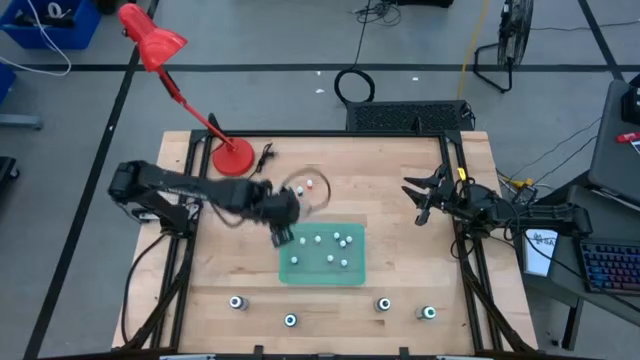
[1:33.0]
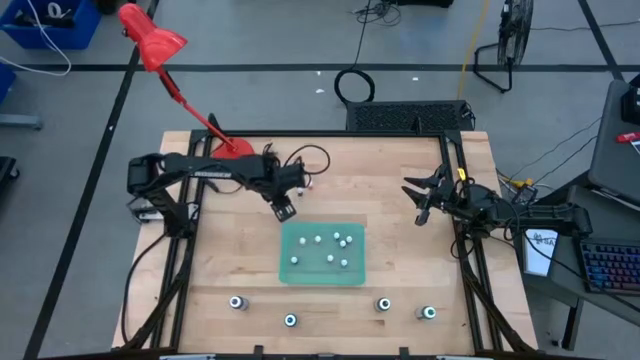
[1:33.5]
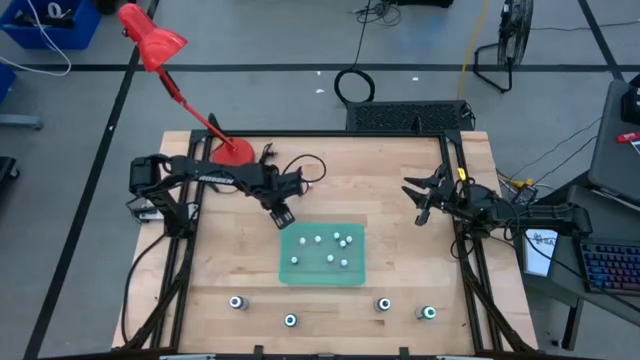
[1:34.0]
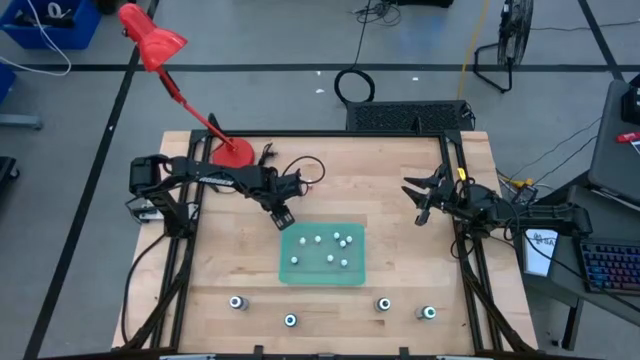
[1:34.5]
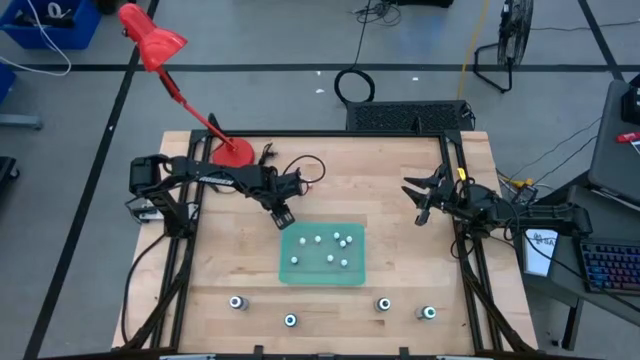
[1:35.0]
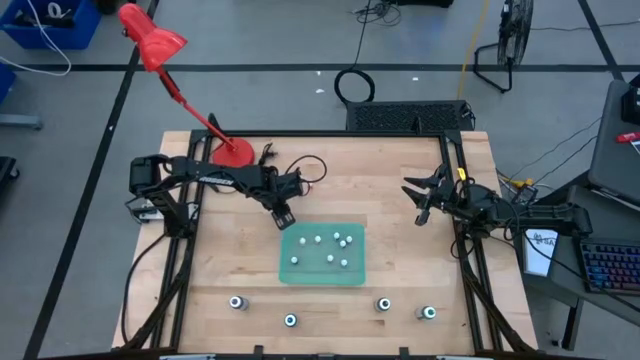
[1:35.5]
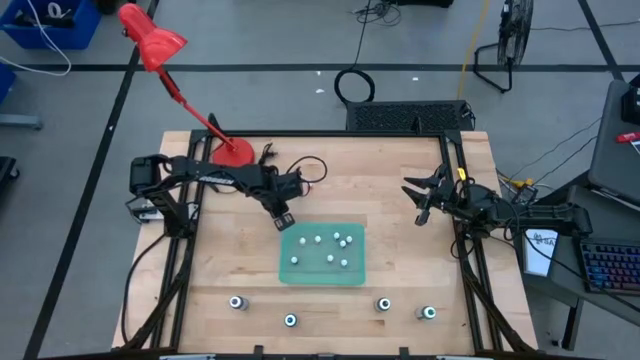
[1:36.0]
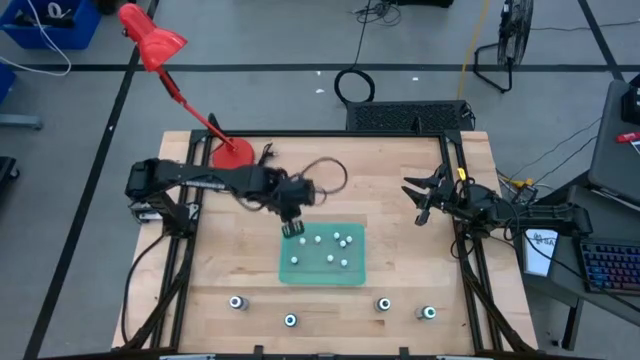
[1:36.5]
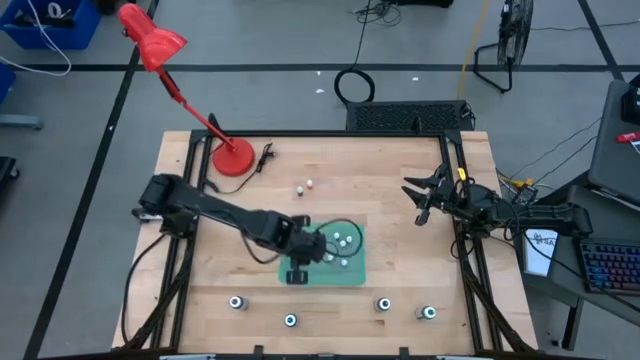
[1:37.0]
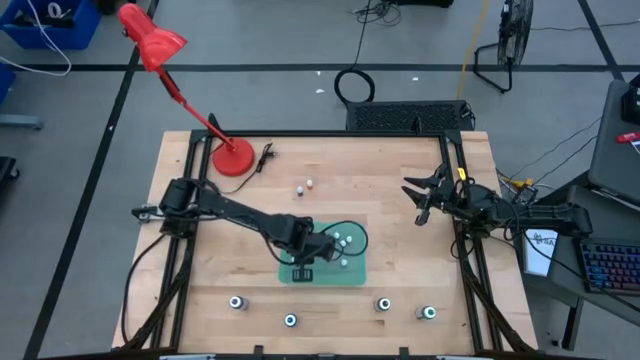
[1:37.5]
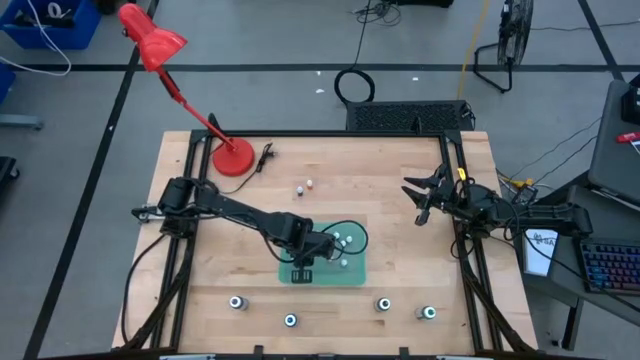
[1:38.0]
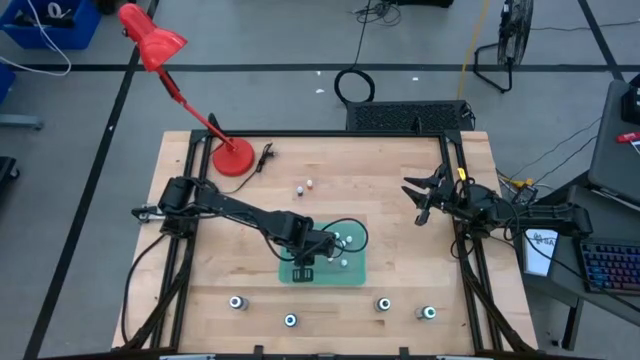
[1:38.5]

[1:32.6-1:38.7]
Task: Pick & Place food coloring
Put the small violet food coloring bottle into the green bin

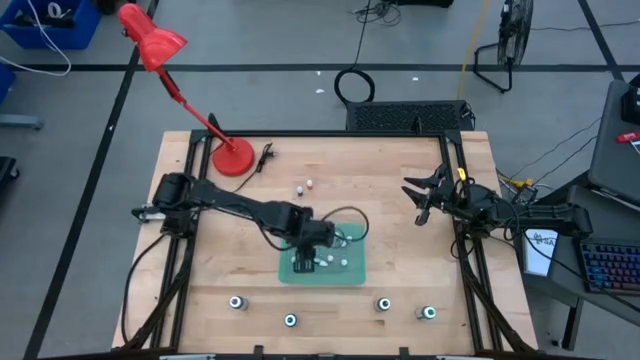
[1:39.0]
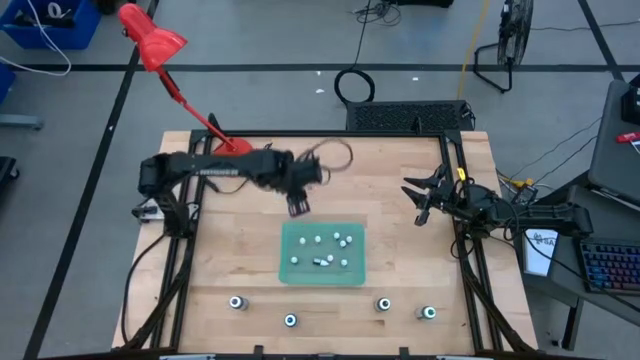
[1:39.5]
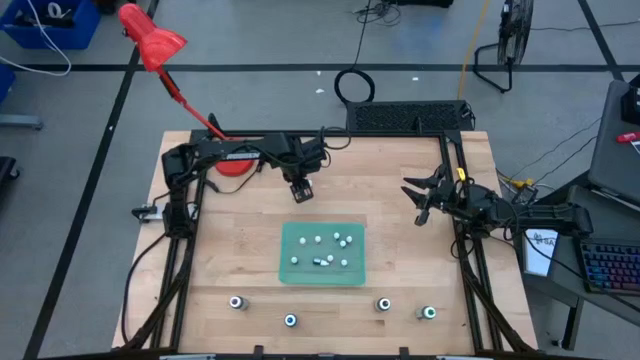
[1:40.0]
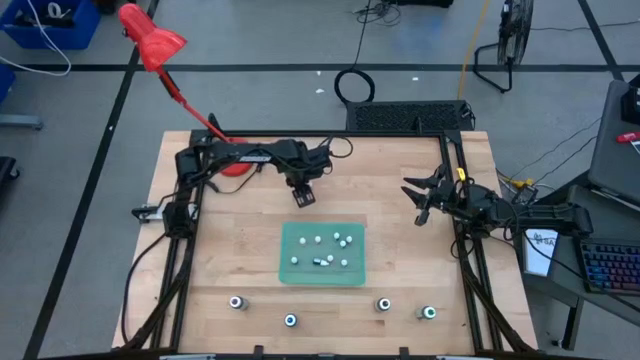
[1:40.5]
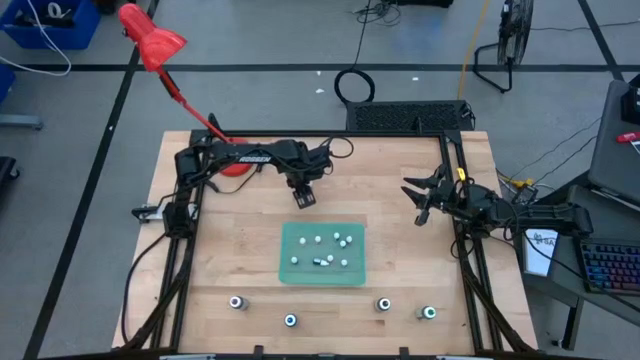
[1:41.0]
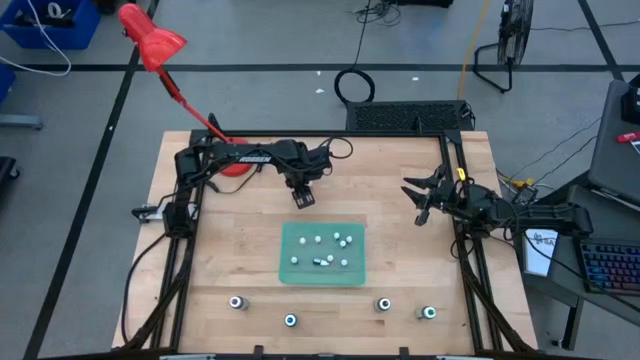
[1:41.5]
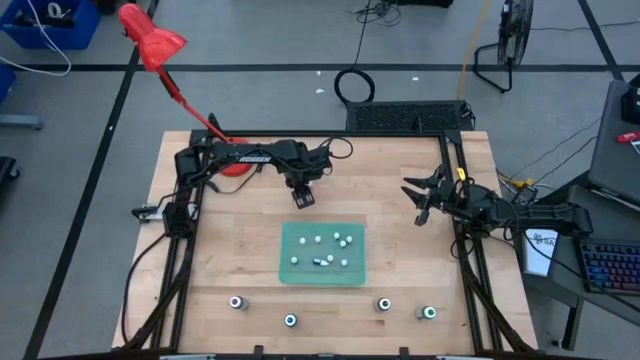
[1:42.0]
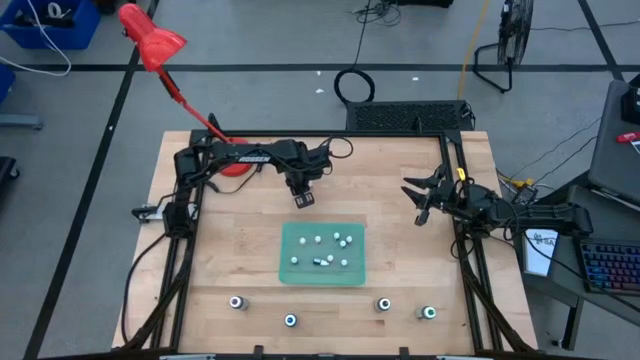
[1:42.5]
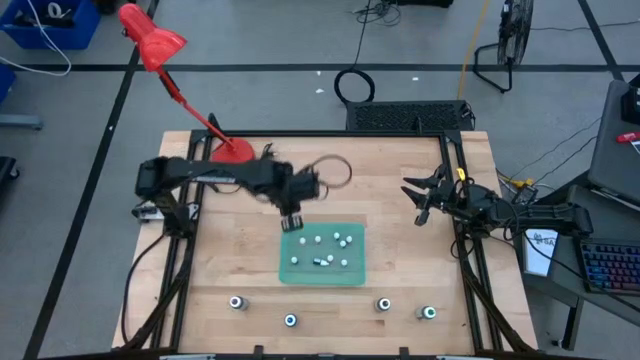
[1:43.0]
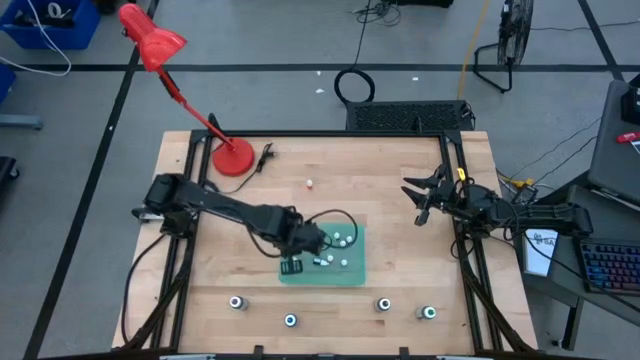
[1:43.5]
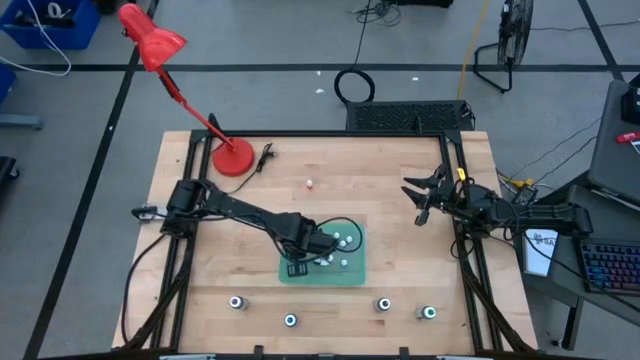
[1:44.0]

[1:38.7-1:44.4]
Put the small blue food coloring bottle into the green bin

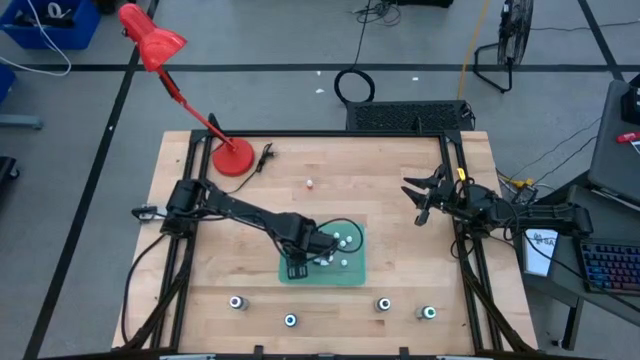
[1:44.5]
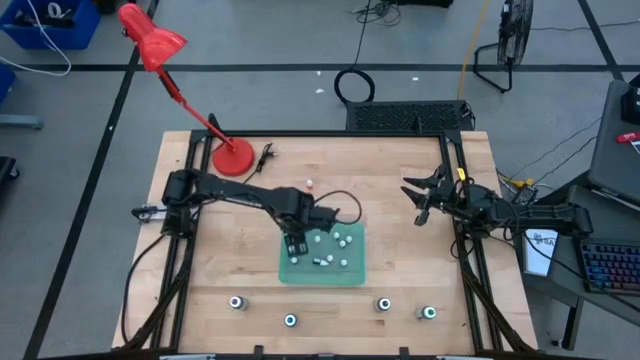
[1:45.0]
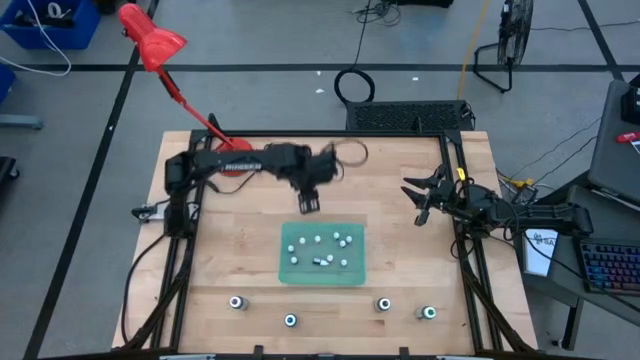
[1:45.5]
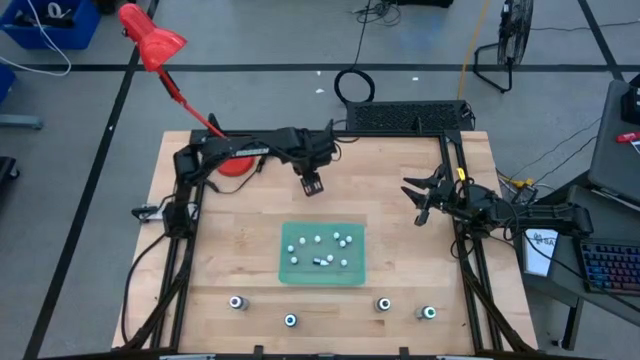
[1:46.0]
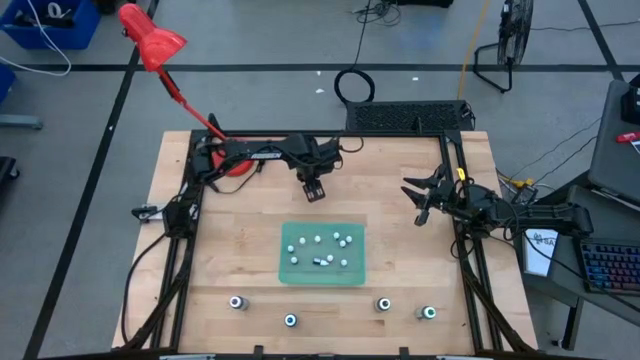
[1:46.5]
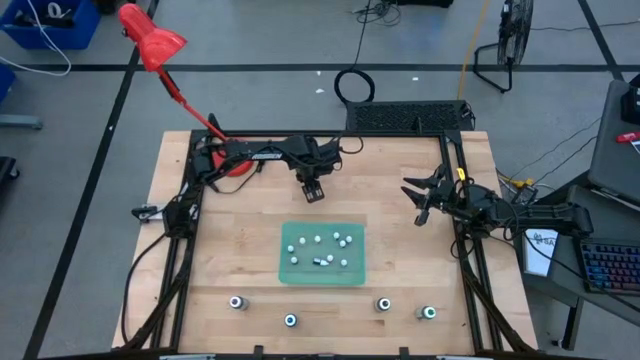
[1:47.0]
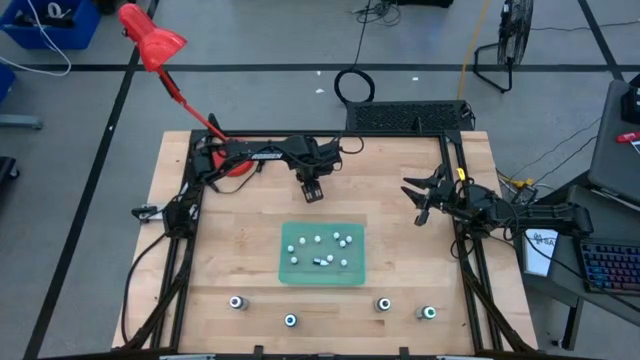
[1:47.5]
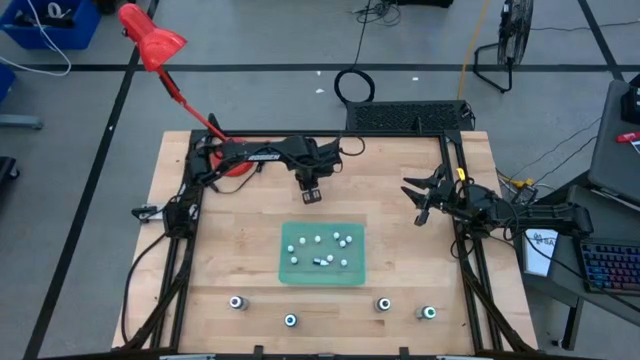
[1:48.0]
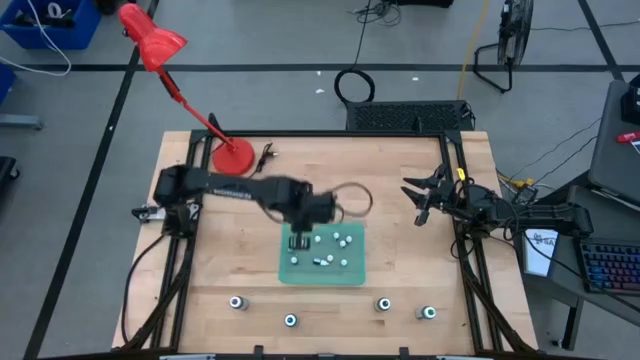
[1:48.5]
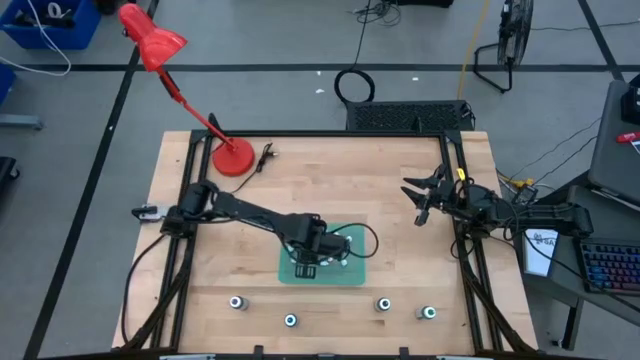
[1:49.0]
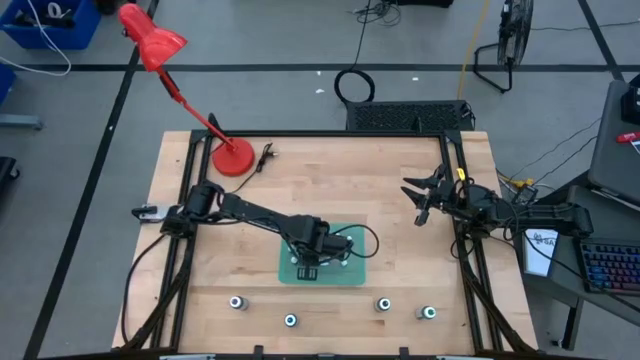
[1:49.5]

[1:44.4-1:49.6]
Put the small orange food coloring bottle into the green bin

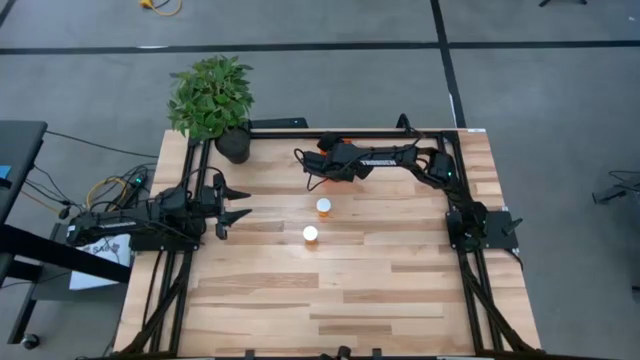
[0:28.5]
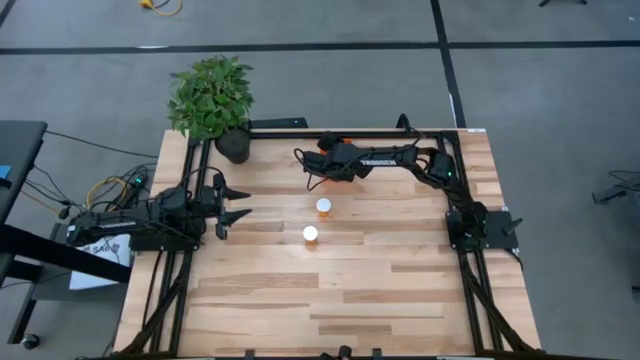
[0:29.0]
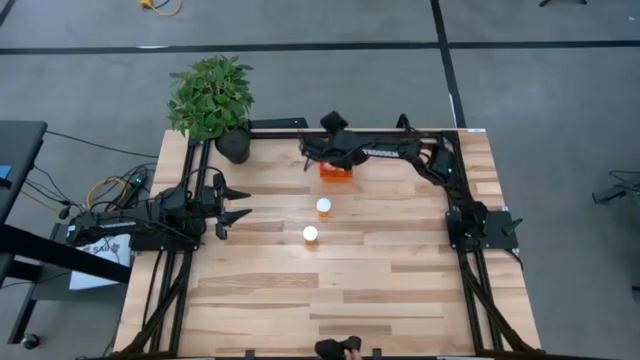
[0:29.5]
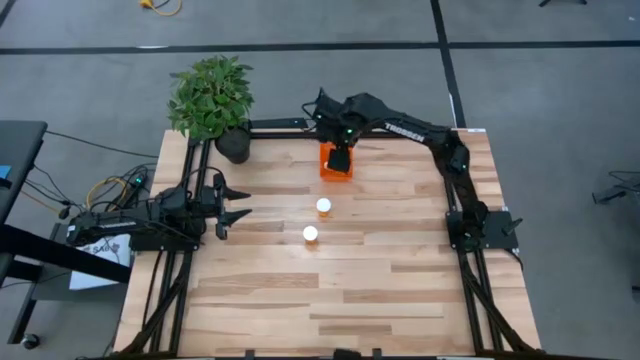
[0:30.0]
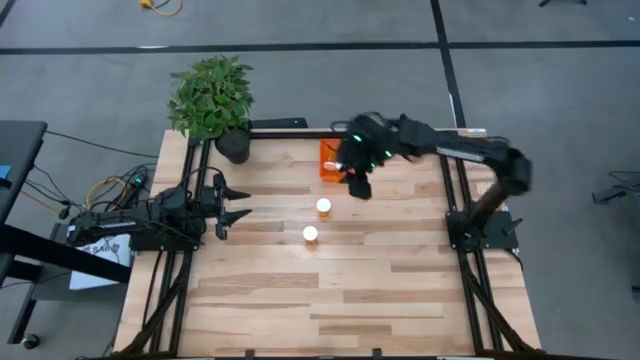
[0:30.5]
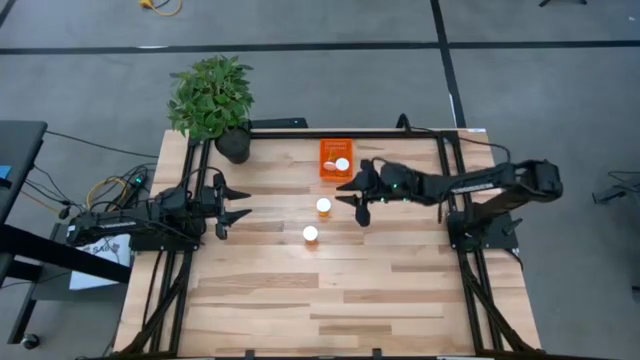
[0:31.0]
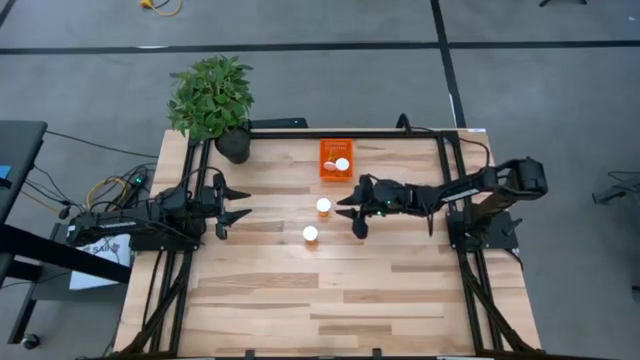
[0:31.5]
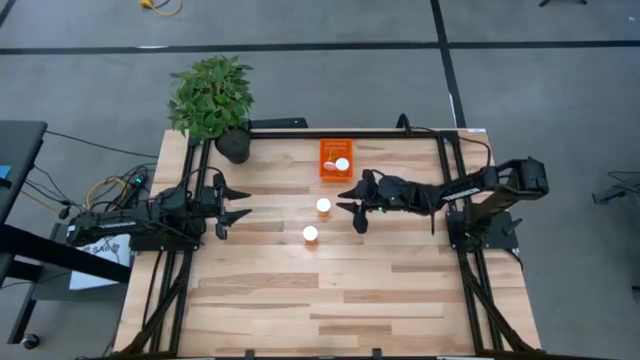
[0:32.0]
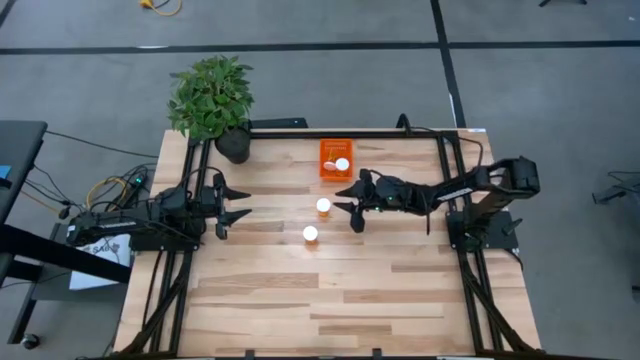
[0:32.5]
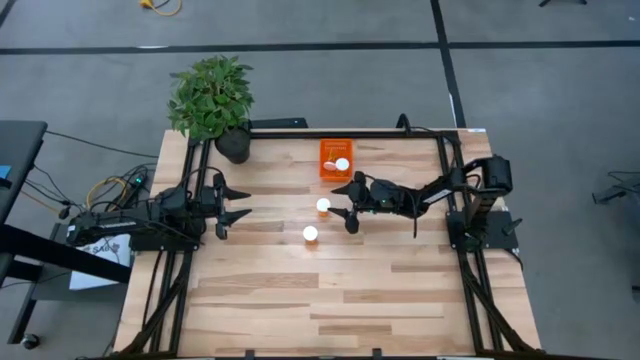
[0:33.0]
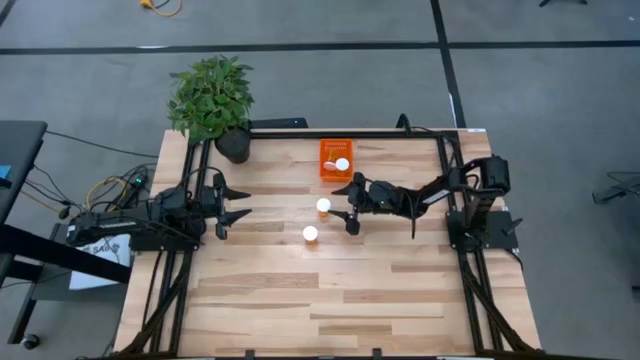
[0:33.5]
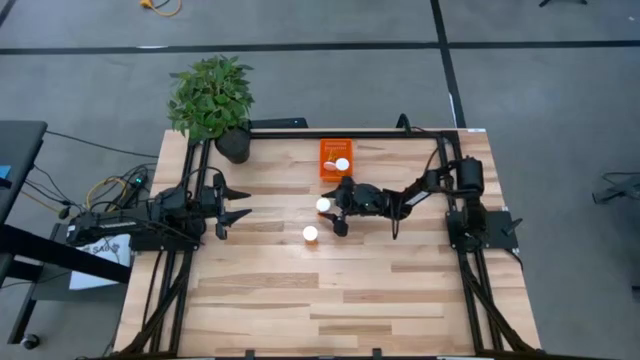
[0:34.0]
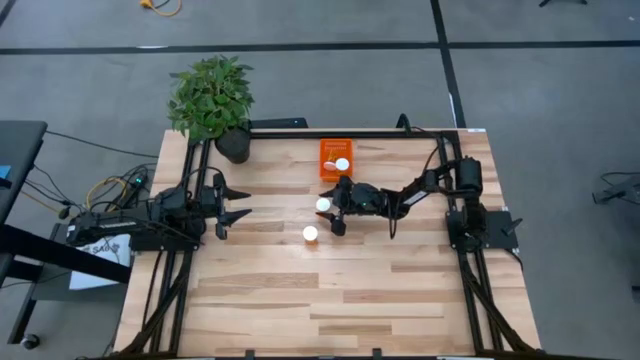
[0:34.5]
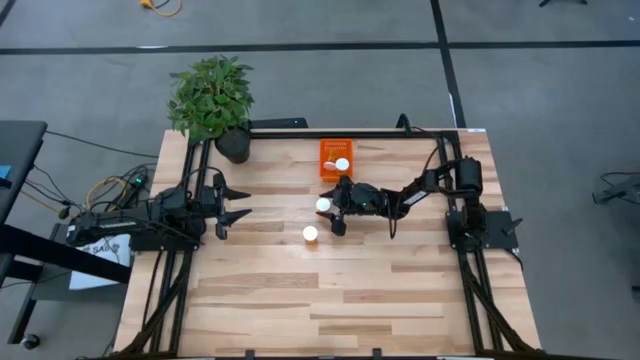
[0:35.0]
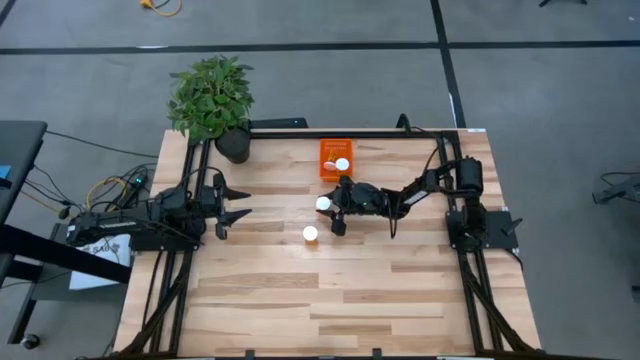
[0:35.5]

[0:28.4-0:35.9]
Task: Pick and place pill bottles into a basket
Put the orange pill bottle into the orange basket
